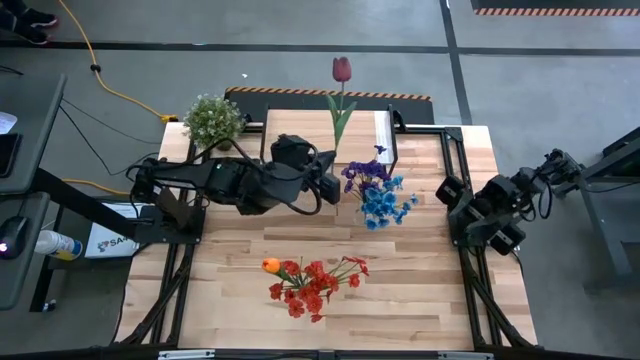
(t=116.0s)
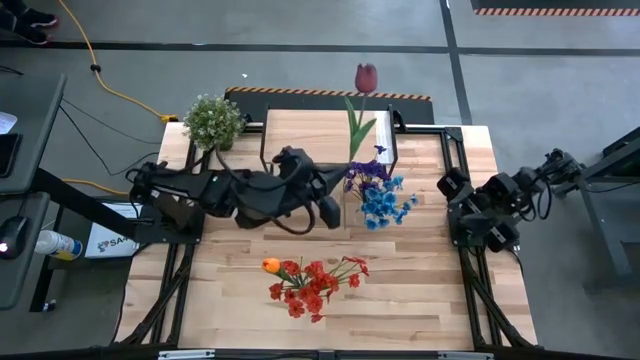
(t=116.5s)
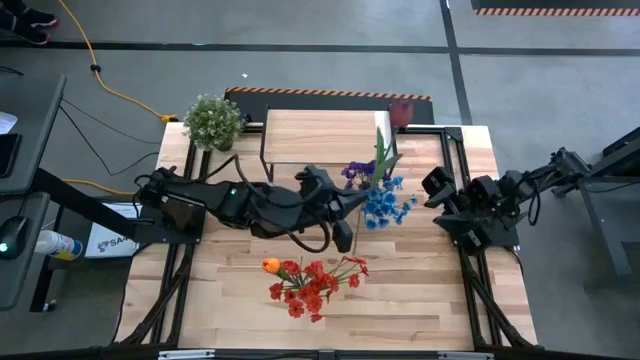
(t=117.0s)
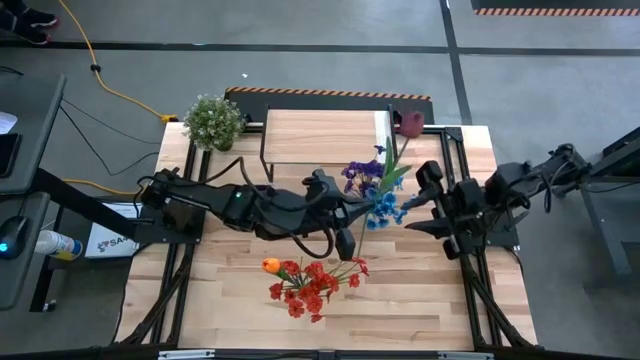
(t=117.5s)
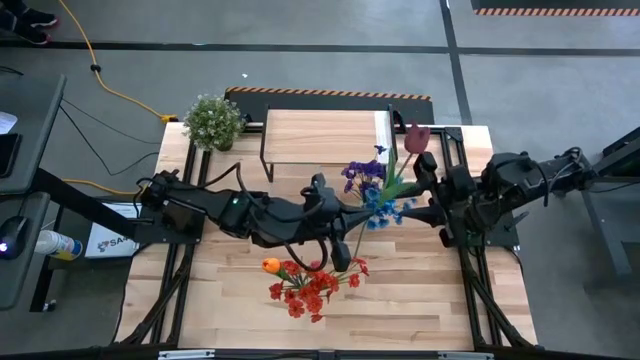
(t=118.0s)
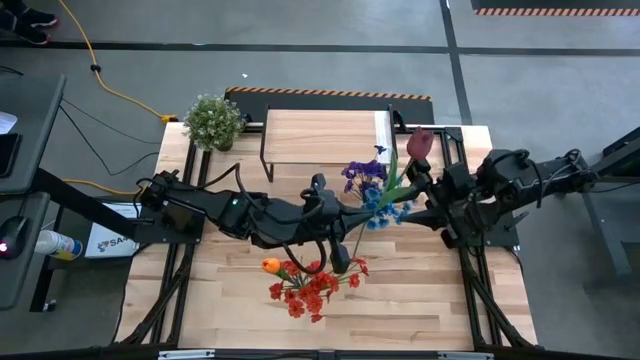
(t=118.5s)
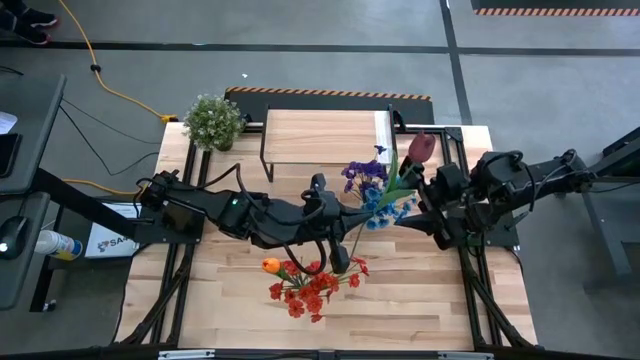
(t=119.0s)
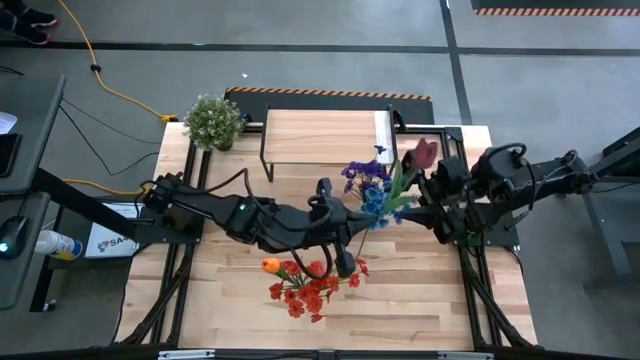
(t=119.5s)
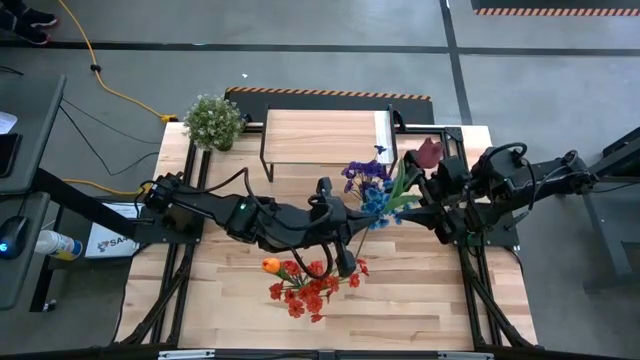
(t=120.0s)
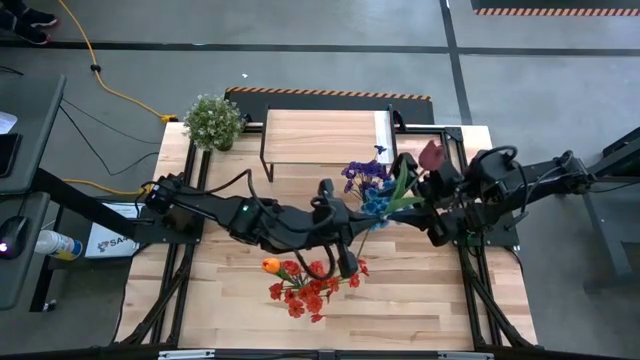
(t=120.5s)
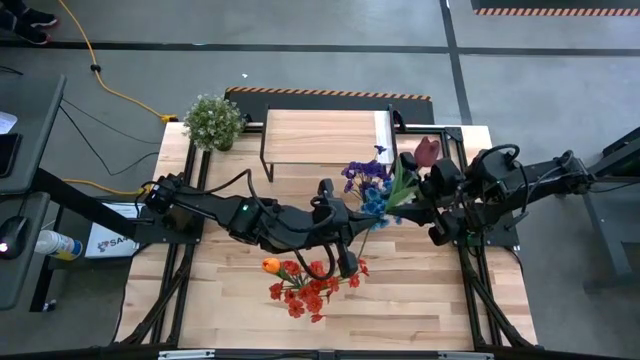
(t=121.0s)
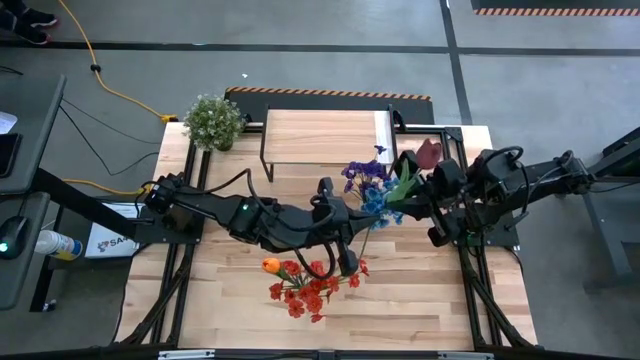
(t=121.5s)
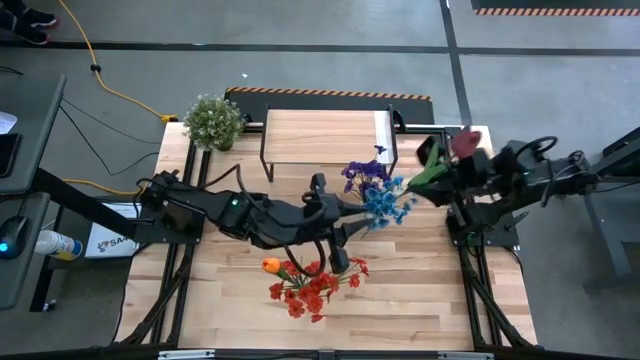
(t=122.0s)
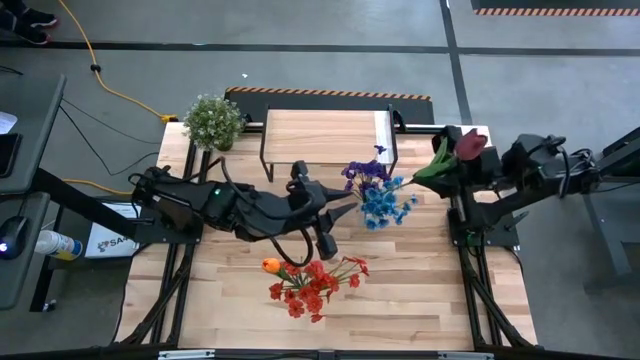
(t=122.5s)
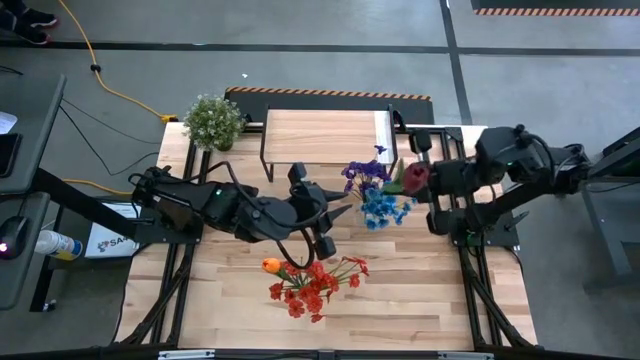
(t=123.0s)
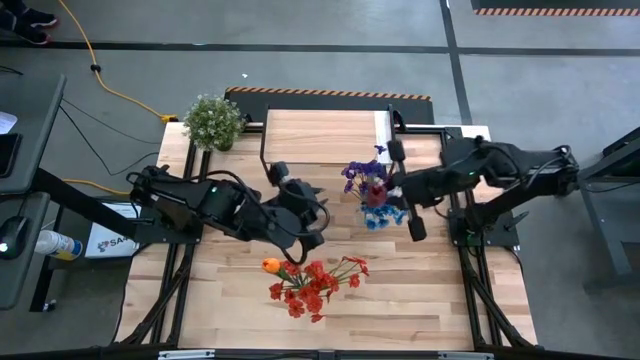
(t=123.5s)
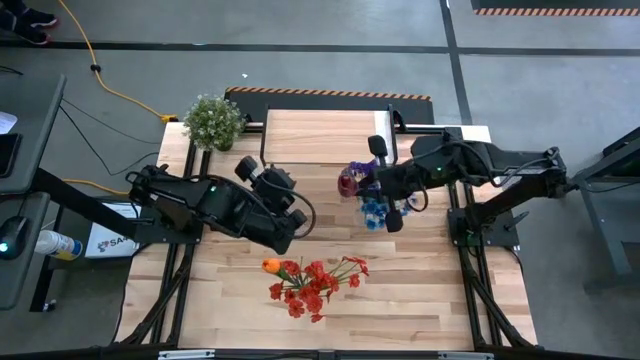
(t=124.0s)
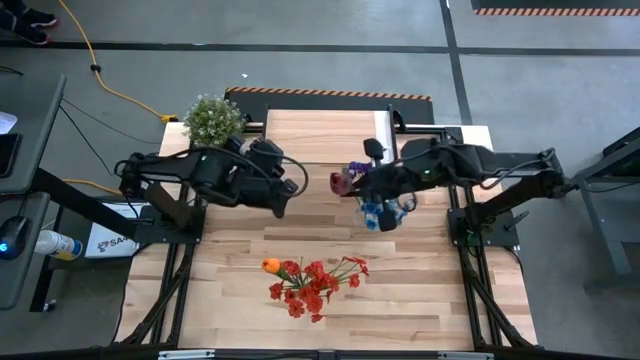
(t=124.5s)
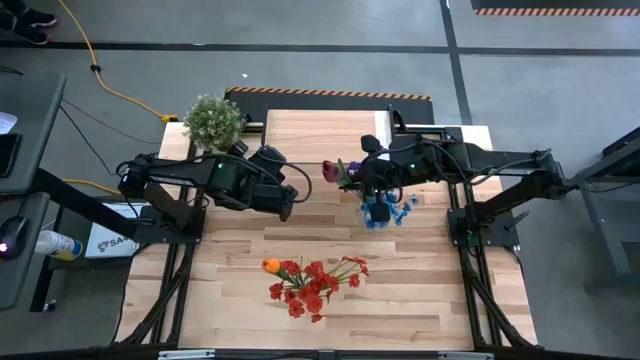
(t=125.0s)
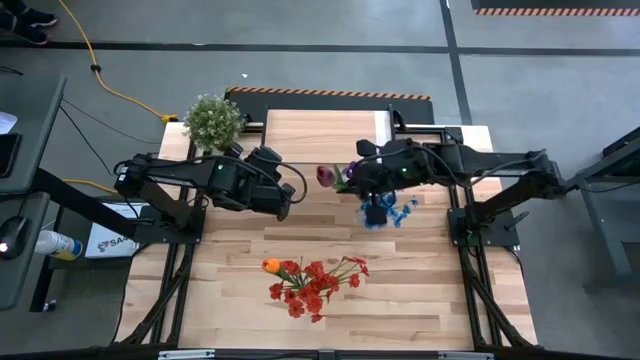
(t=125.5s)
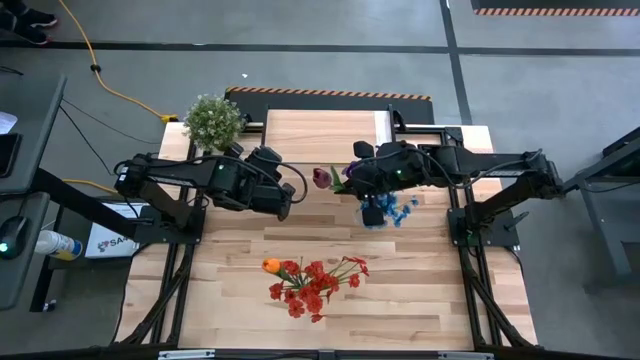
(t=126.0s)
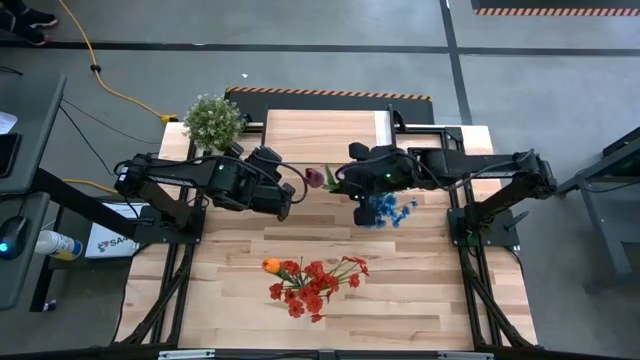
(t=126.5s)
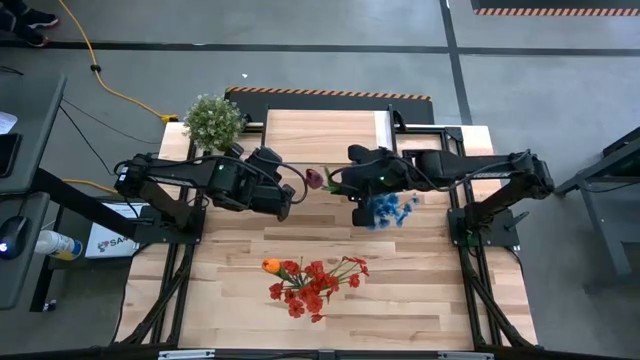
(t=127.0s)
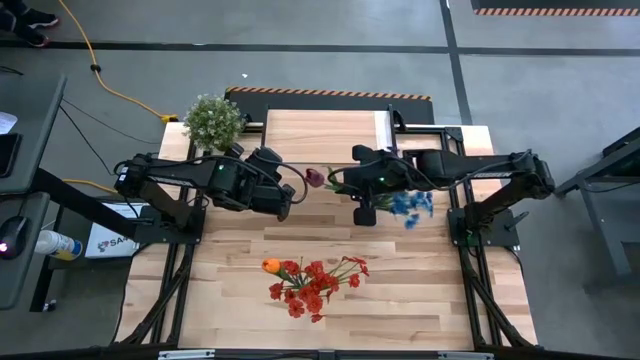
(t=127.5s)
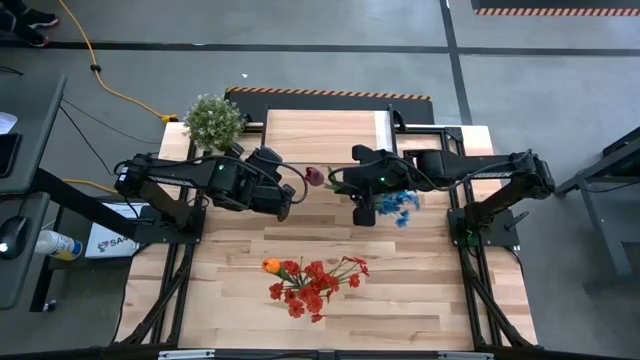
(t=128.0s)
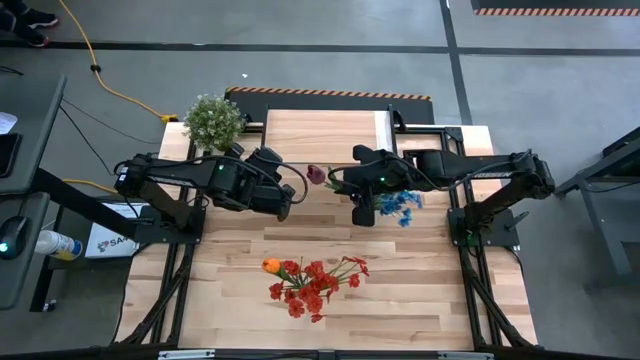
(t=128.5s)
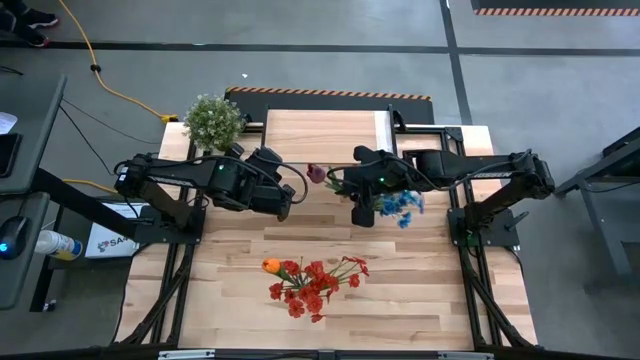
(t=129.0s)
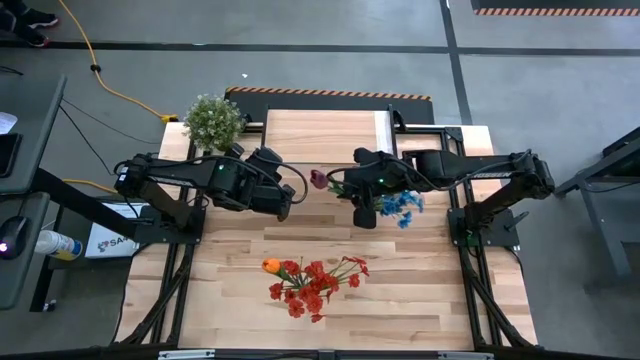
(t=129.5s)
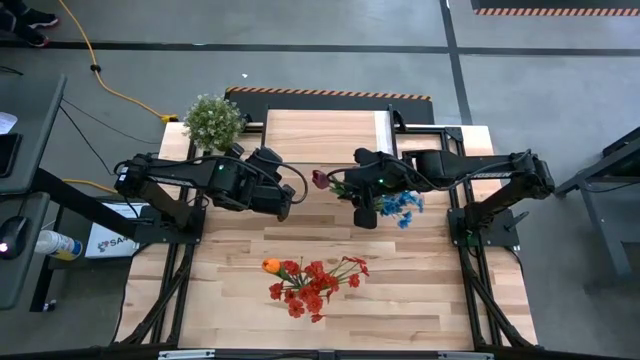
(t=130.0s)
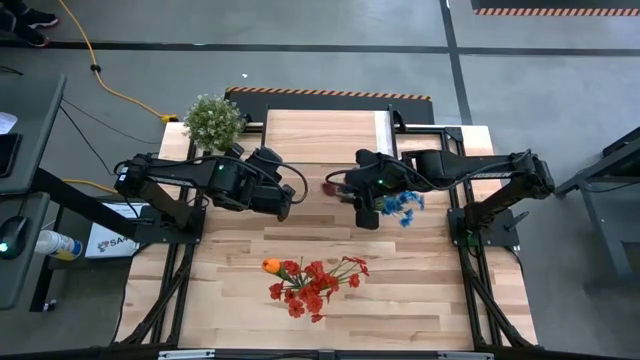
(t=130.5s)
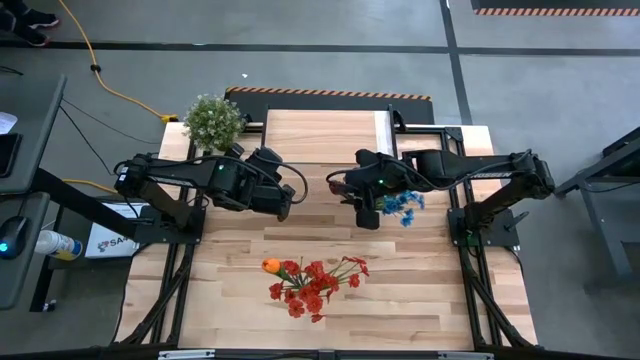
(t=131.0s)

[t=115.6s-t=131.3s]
Task: Pick and place flowers into a vace then onto a shelf
Put the red flower into the top transparent vase

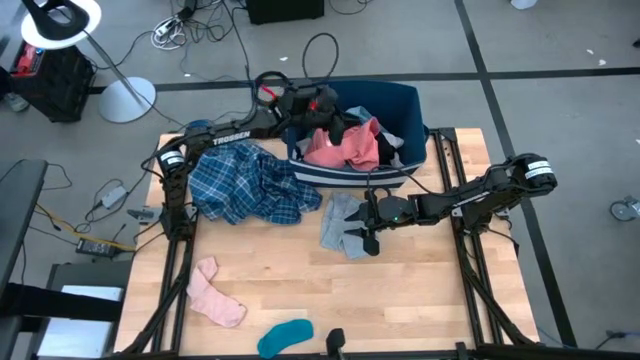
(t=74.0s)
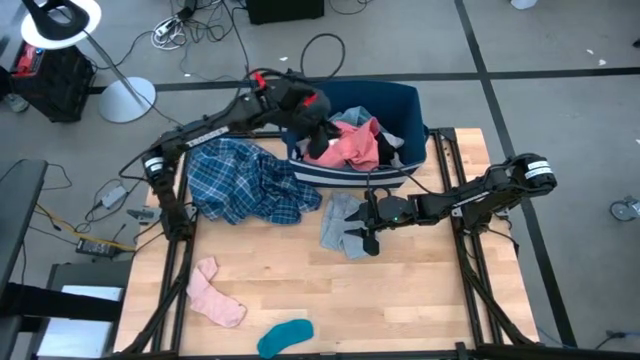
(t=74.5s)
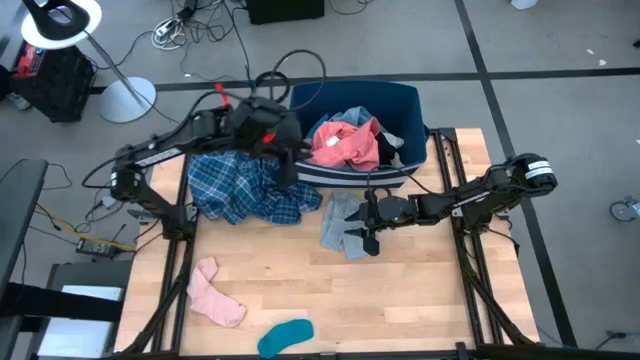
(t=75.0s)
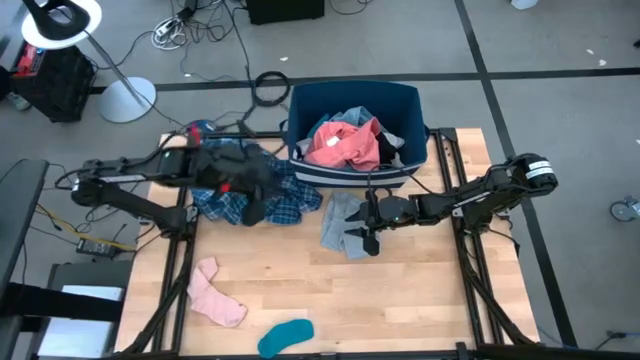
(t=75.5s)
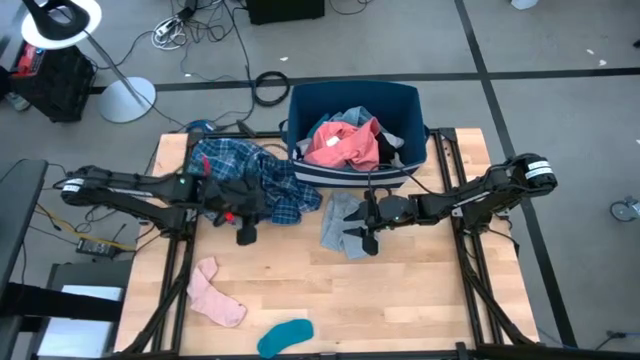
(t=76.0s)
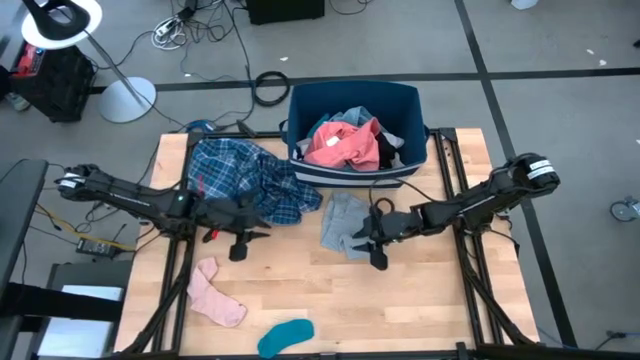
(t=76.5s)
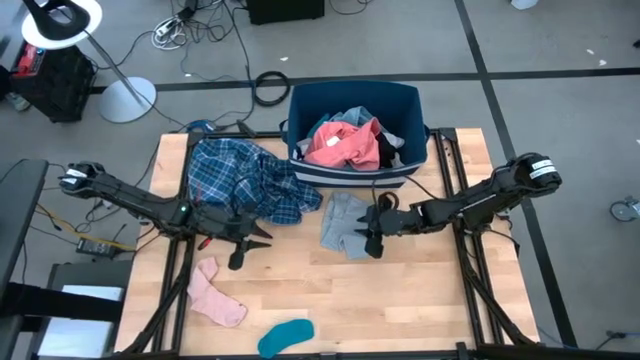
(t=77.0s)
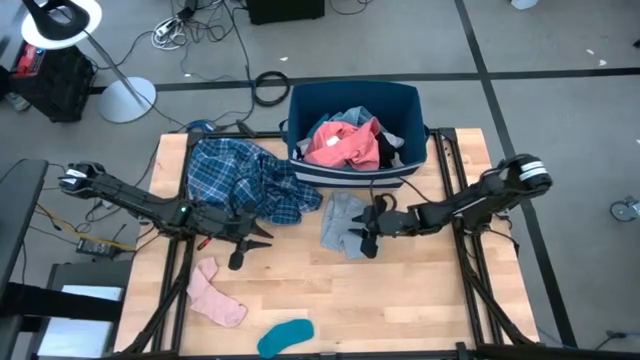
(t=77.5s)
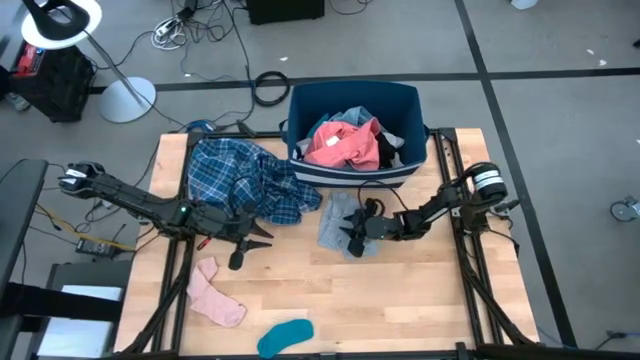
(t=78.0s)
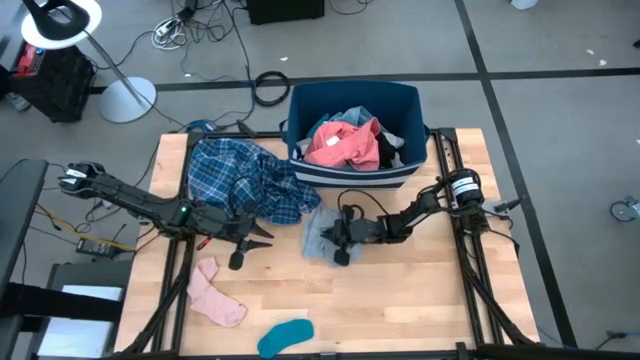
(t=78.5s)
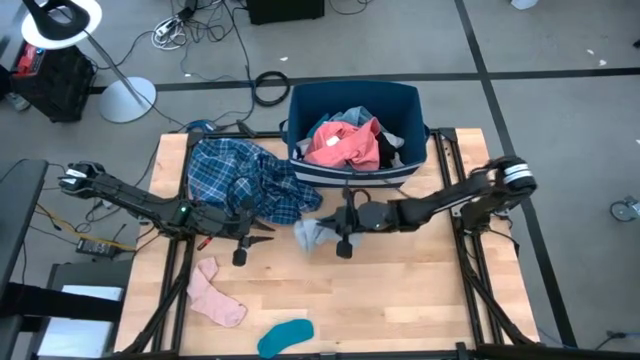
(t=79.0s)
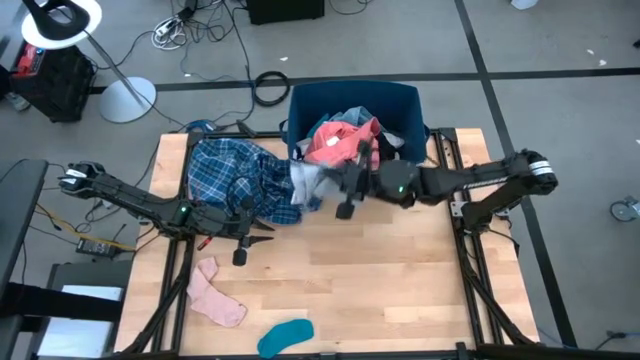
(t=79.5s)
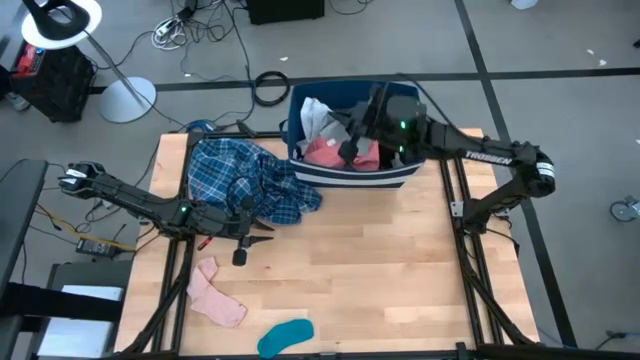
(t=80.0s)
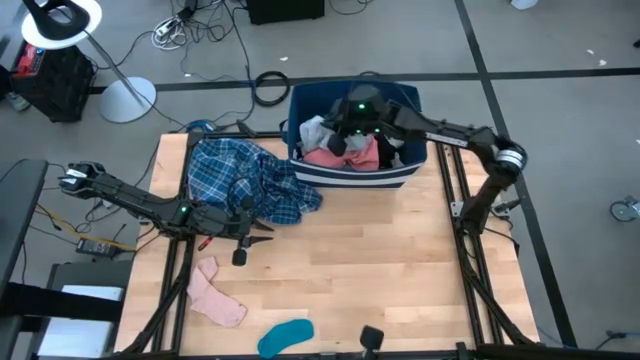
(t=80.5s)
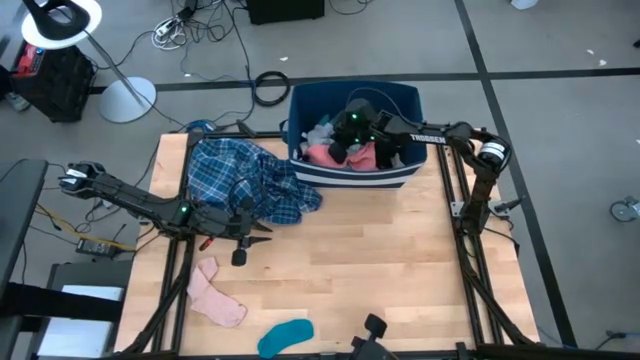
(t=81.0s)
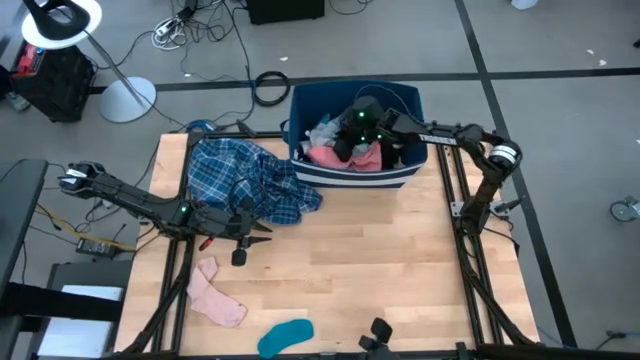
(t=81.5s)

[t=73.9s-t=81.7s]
Task: Sort clothes
Put the gray underwear into the blue bin
